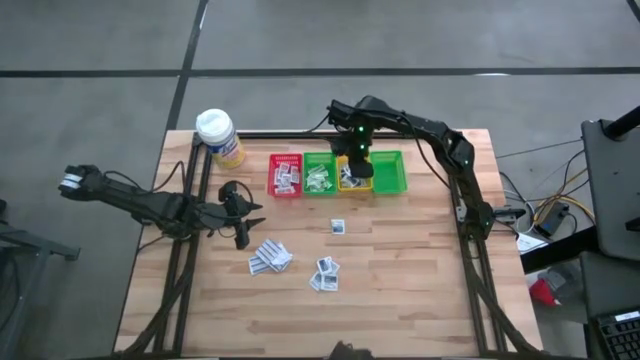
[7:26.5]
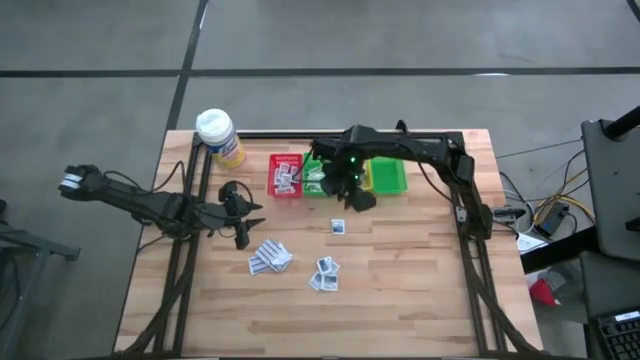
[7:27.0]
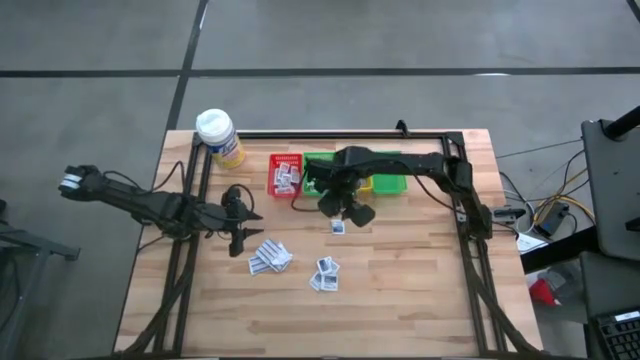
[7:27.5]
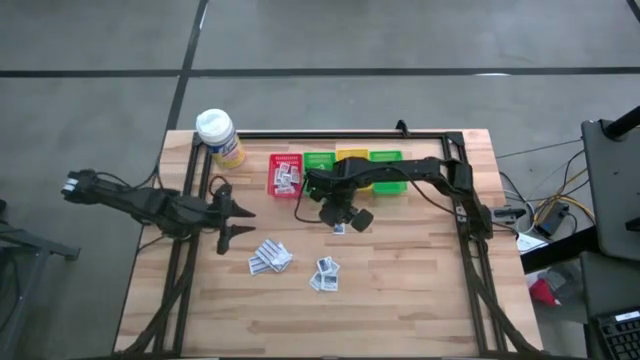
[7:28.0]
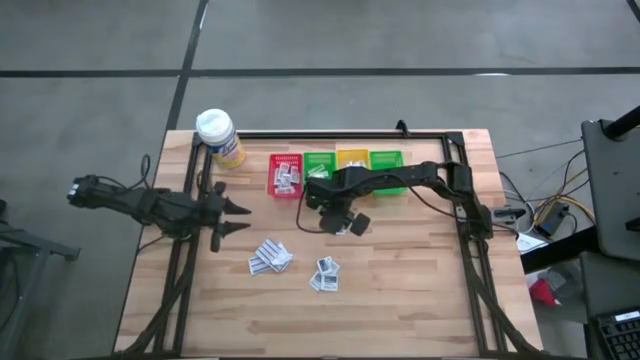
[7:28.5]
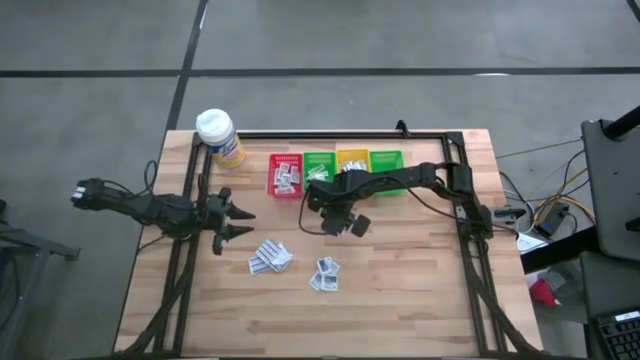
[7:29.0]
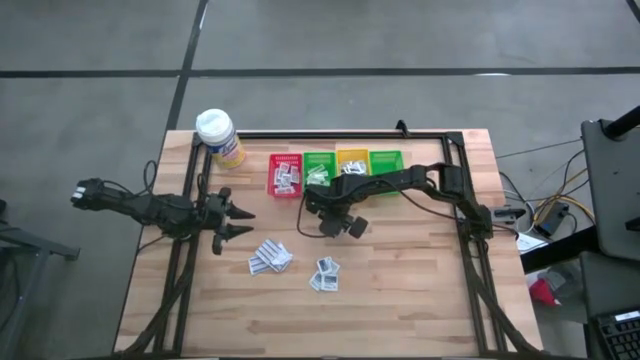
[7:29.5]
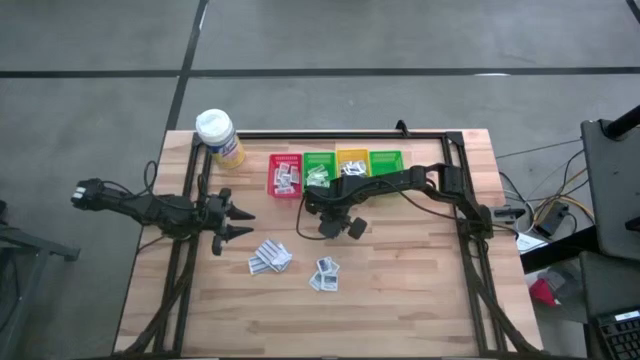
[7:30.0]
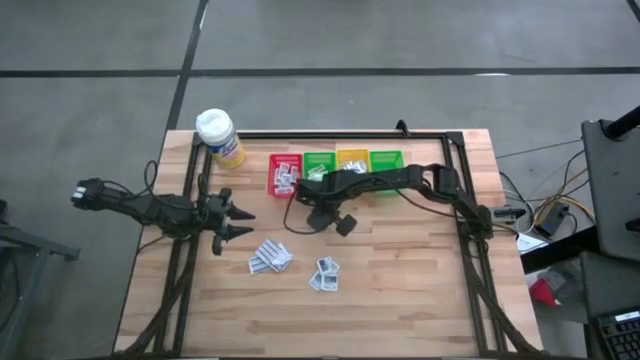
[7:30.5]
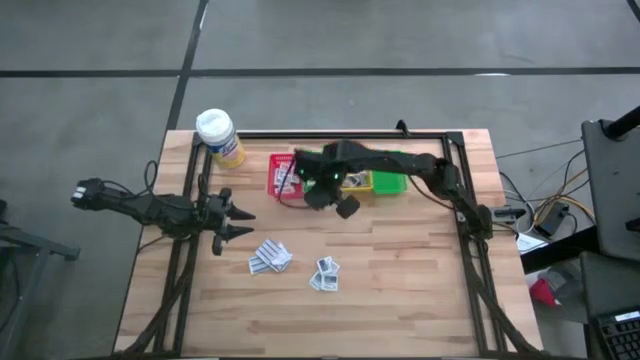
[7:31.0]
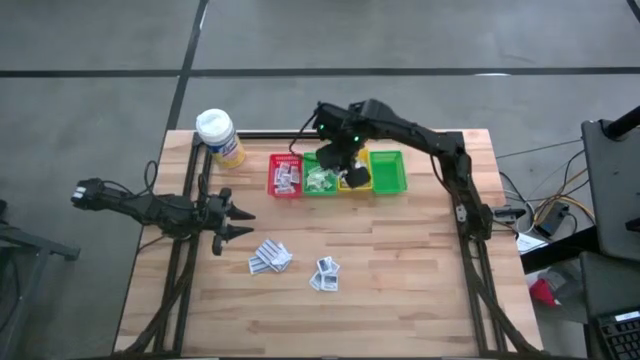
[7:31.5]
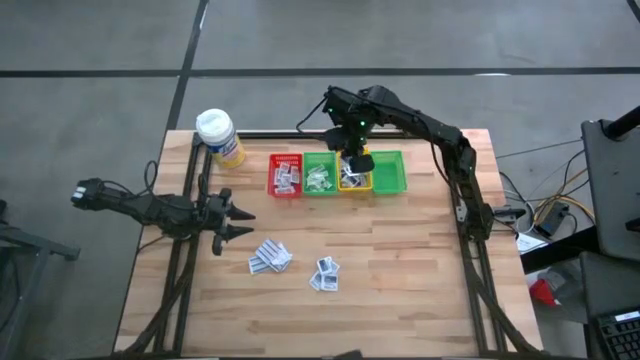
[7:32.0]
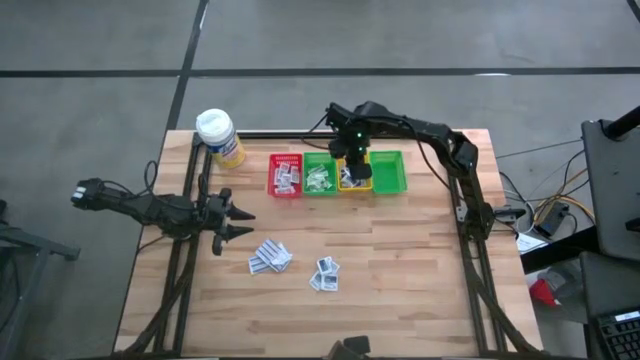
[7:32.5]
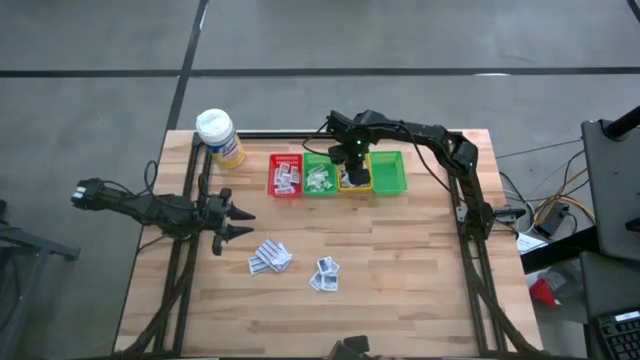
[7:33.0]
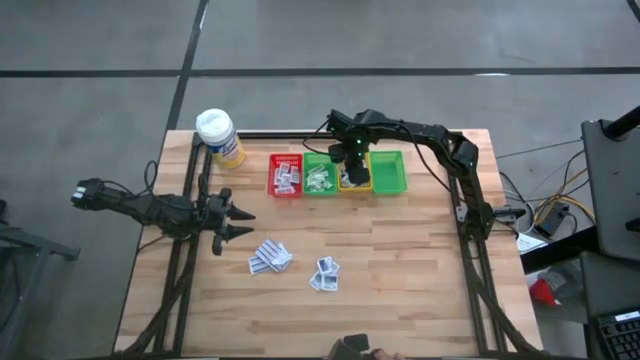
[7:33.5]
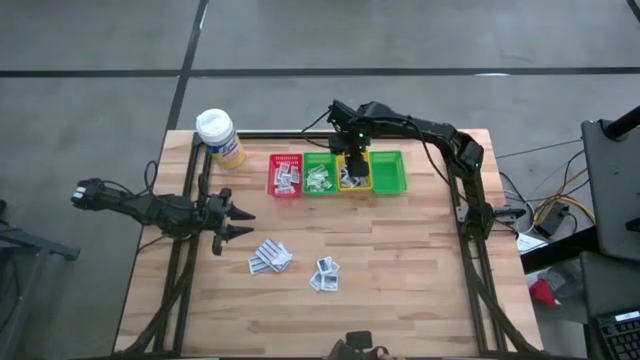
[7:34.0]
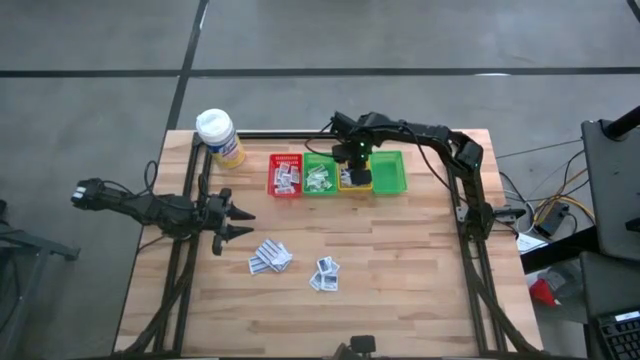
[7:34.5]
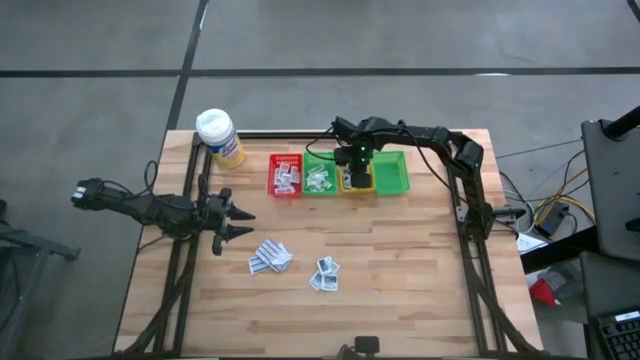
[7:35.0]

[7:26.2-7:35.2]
Task: Pick & Place First Aid Supplies
Put the alcohol pad into the yellow bin

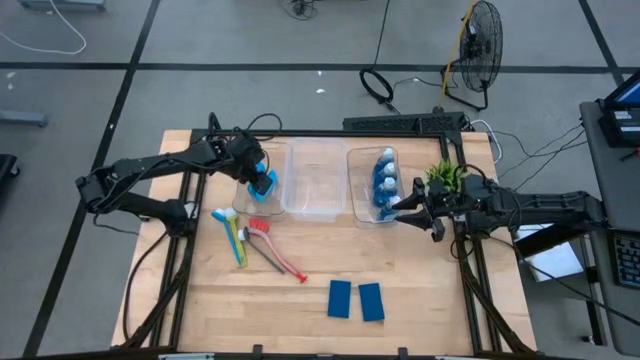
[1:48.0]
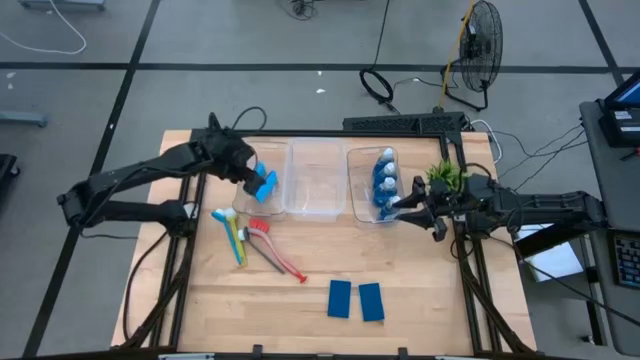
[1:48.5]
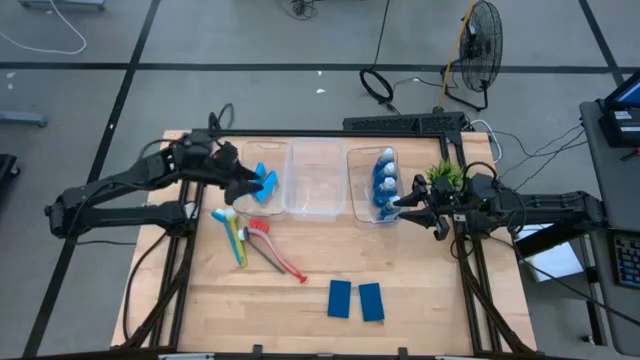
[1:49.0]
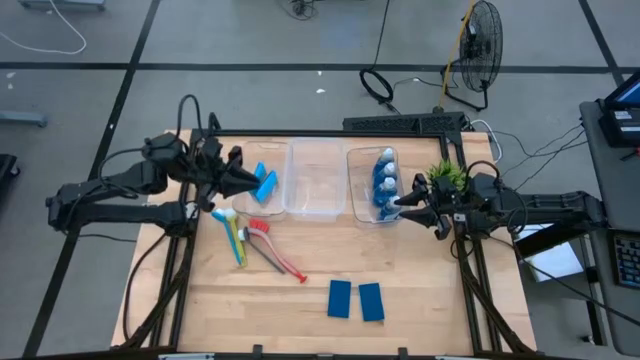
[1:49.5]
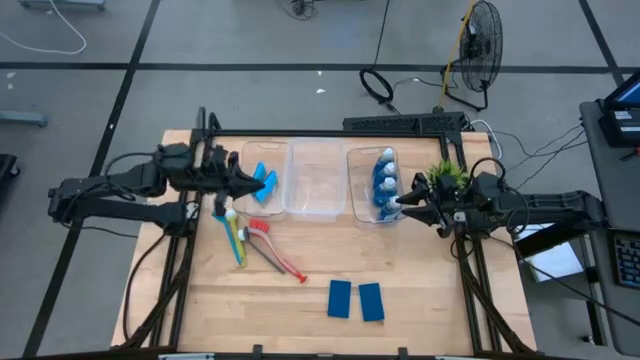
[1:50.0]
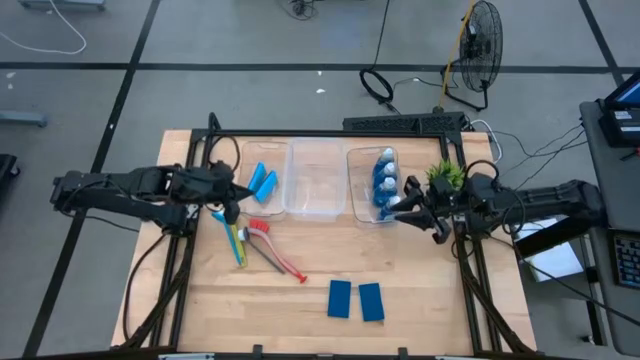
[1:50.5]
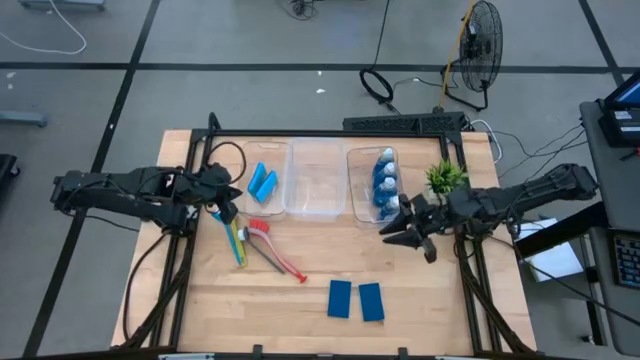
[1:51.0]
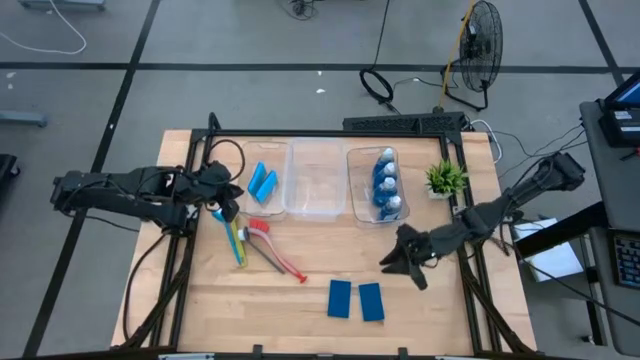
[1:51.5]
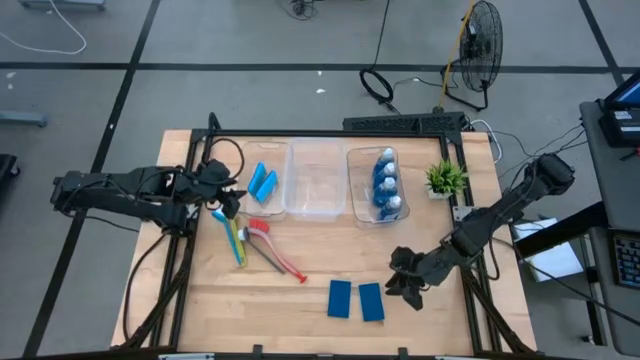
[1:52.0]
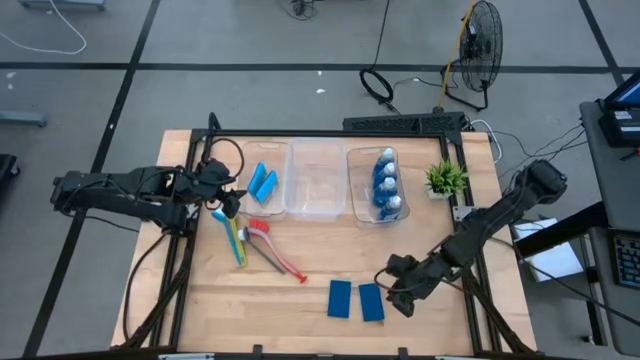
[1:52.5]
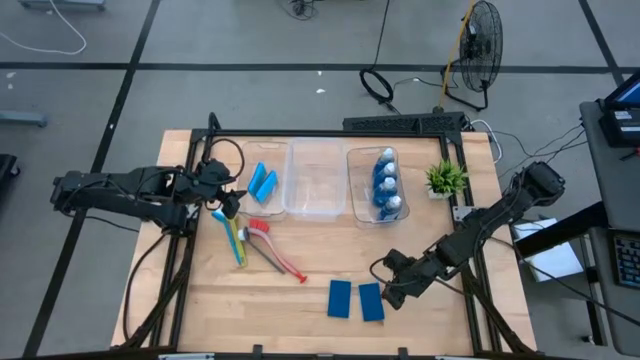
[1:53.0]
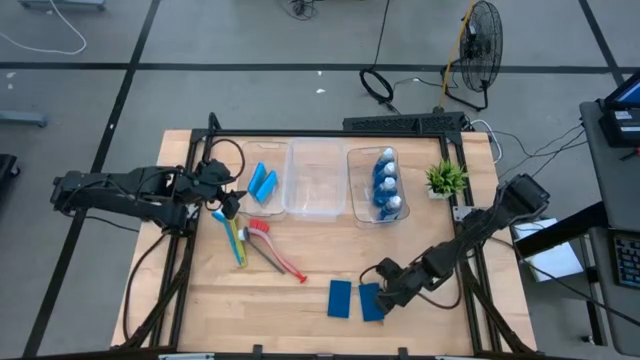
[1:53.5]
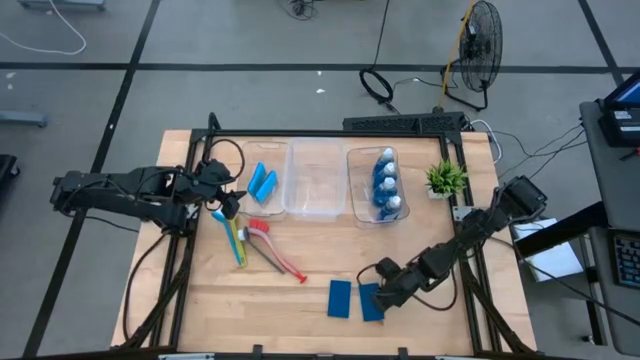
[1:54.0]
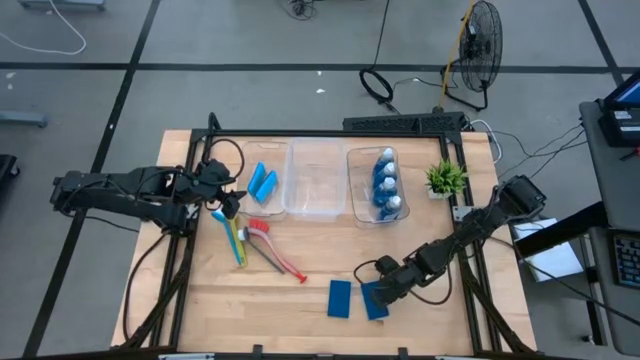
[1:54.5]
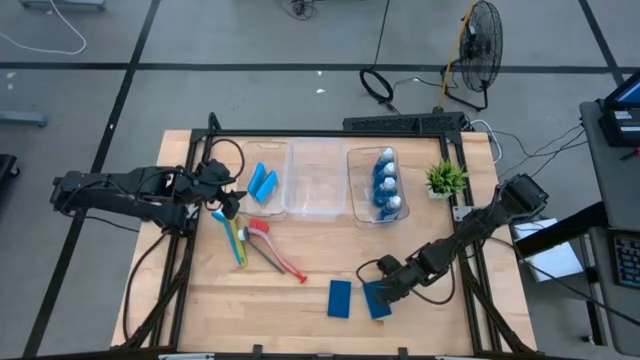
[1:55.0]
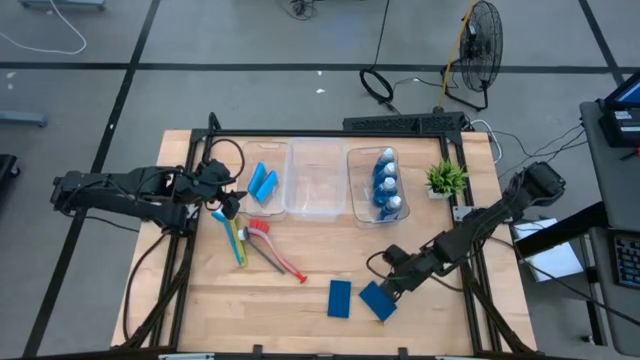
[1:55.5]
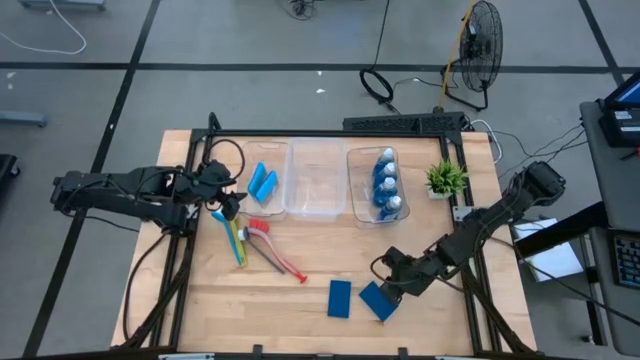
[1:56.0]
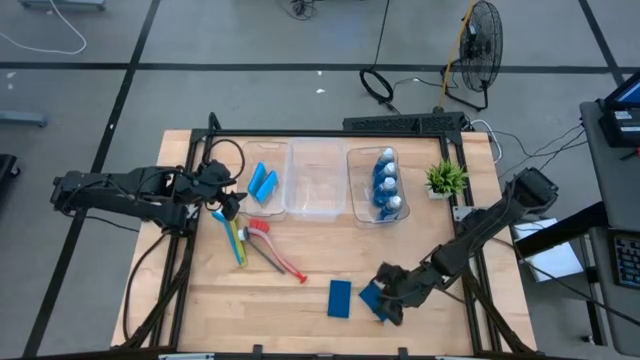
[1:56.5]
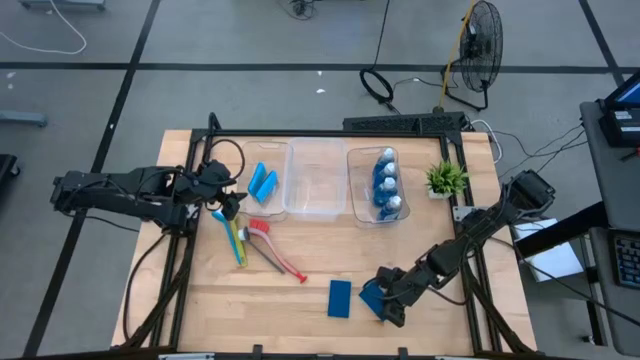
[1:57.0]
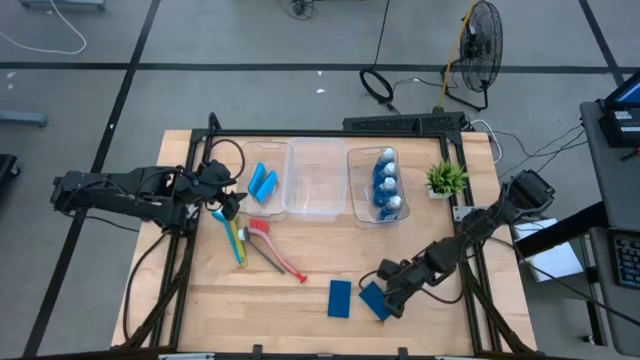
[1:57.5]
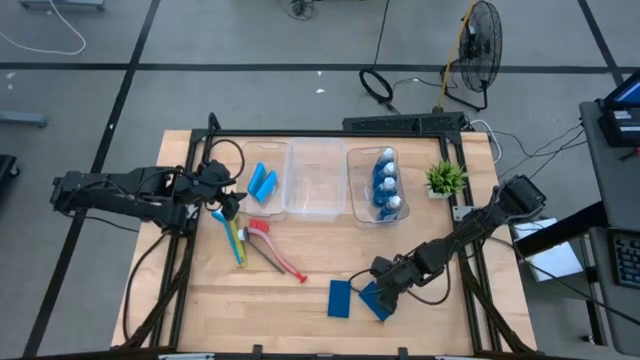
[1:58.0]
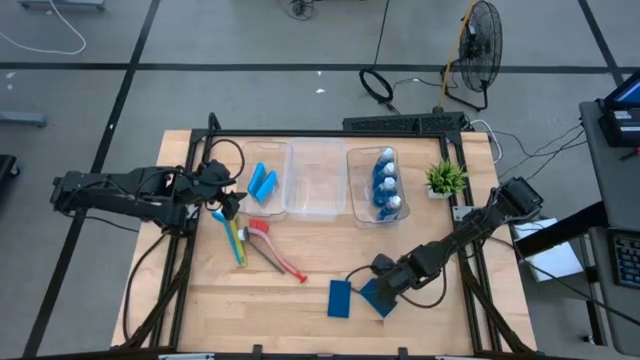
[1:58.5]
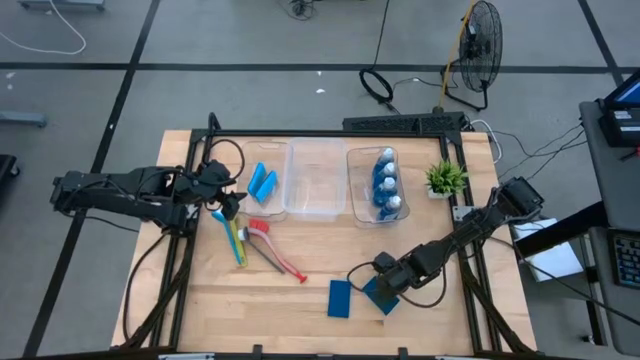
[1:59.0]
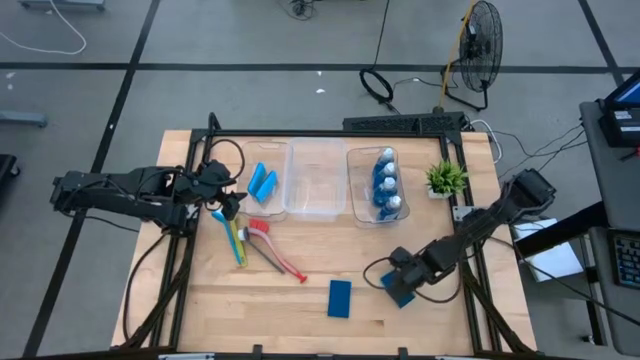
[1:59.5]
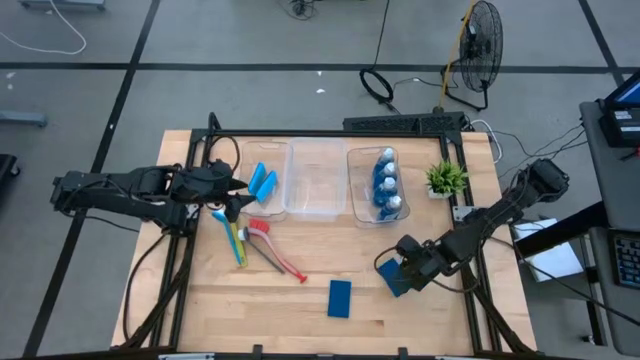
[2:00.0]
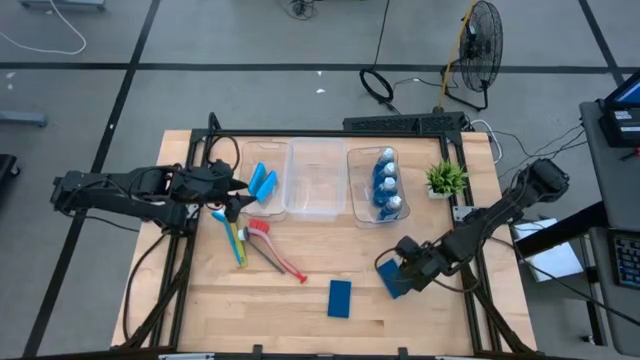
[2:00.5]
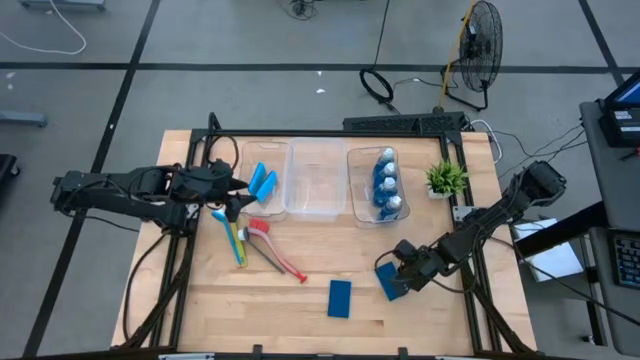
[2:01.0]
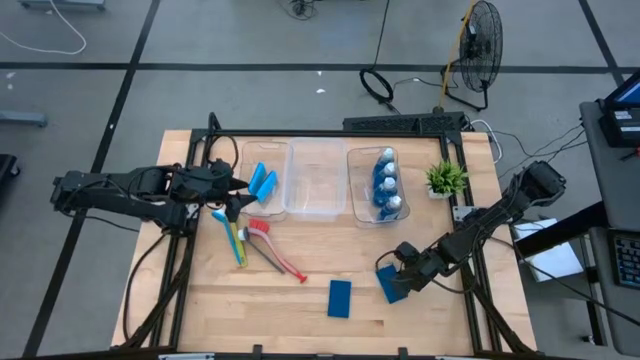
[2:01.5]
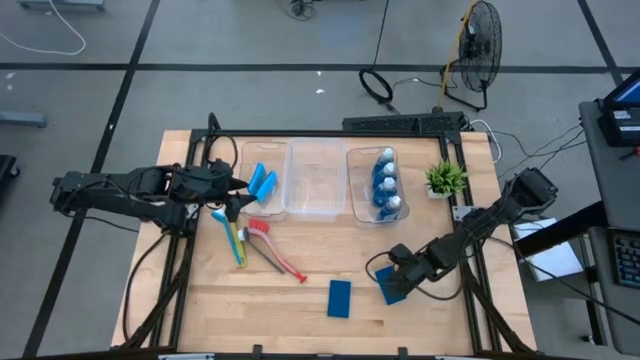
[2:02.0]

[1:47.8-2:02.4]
Task: Pick & Place Kitchen Sink Supplies
Put the blue sponge into the left transparent bin
